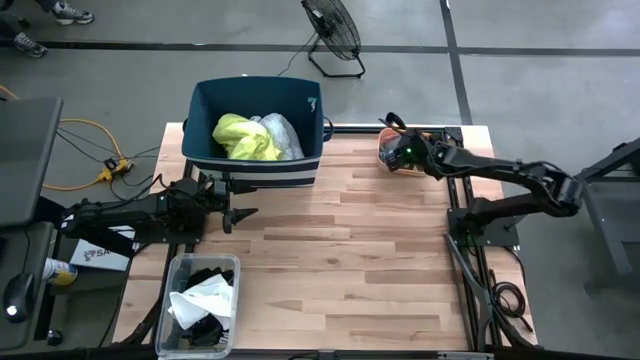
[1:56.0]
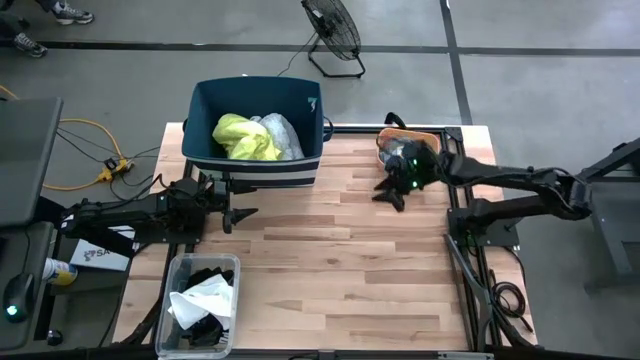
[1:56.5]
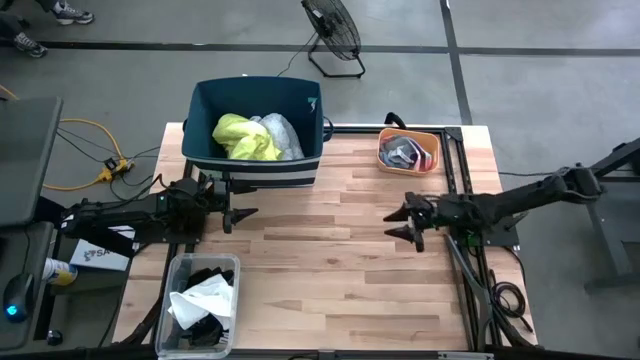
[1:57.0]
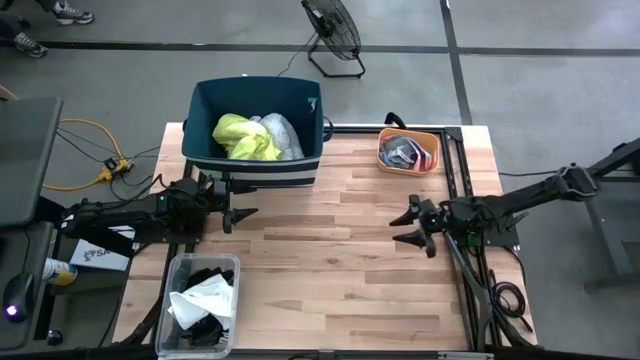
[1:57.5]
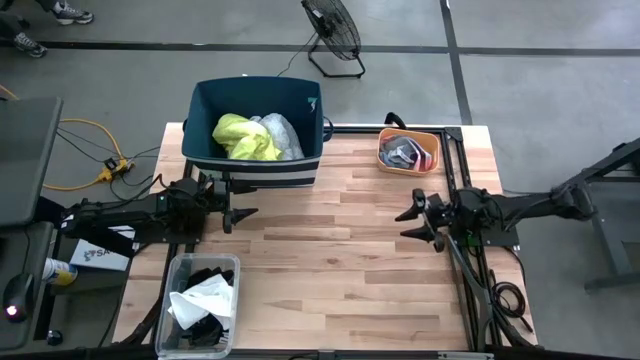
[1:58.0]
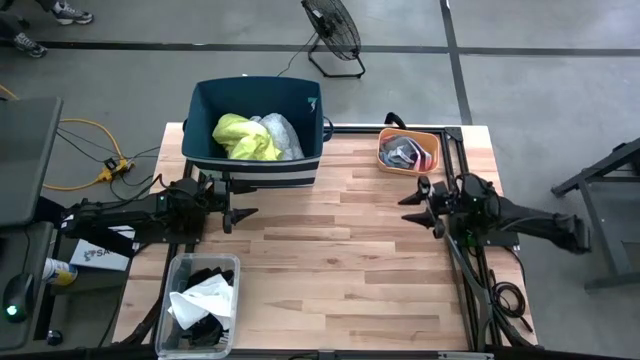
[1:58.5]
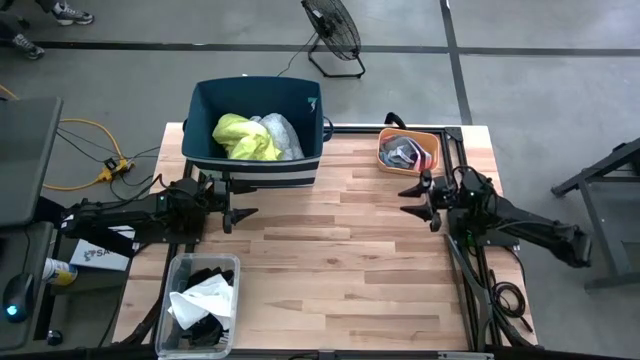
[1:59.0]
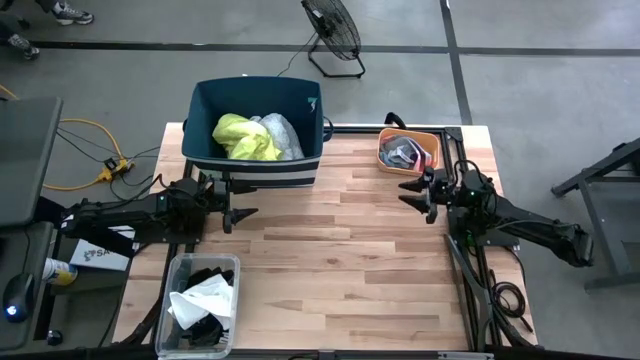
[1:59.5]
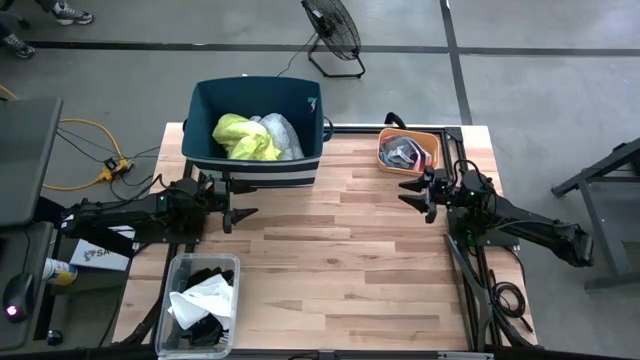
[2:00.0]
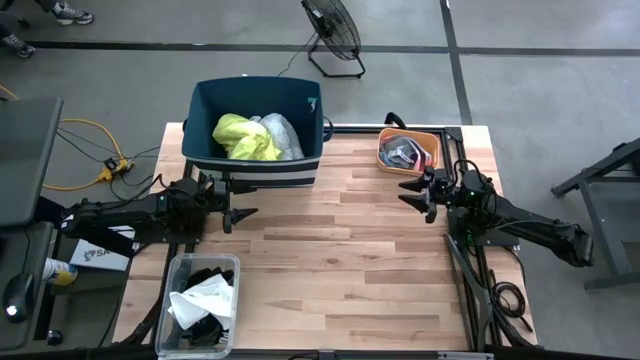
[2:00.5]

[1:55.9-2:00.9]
Task: Pick & Place Cloths
Return to Home Position

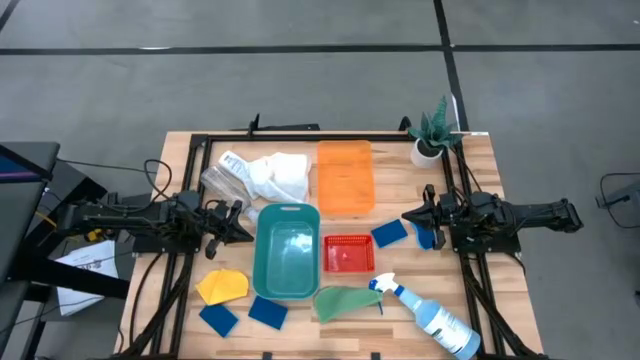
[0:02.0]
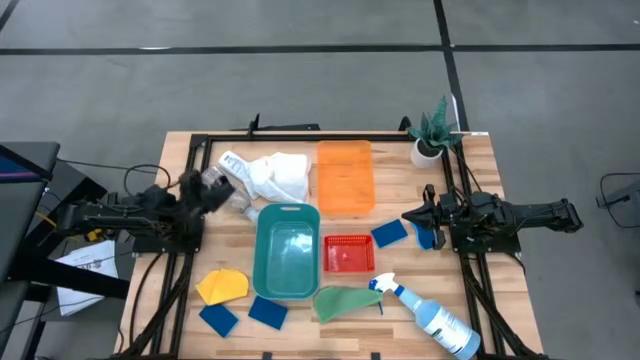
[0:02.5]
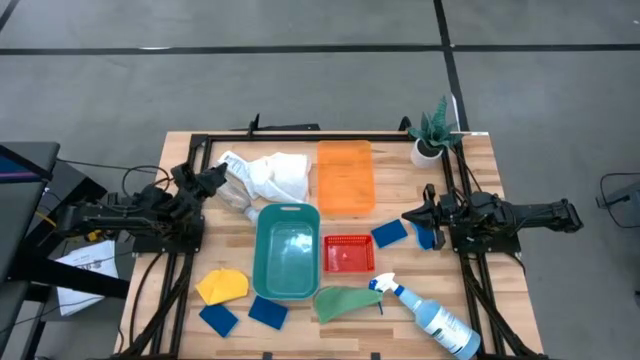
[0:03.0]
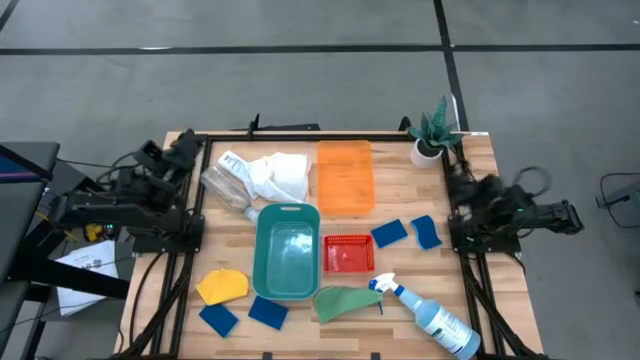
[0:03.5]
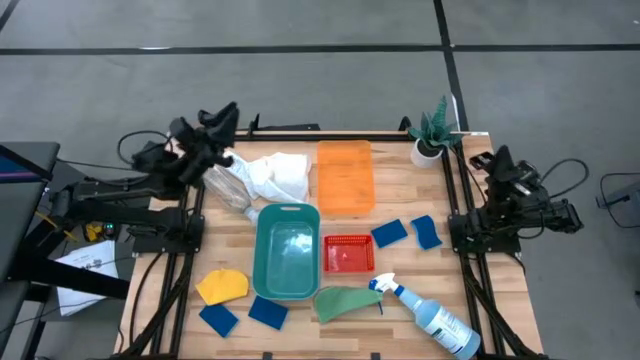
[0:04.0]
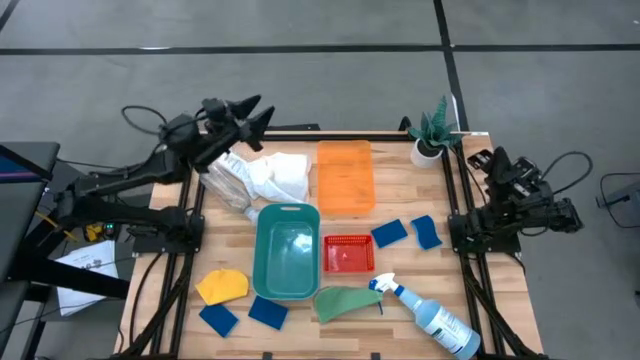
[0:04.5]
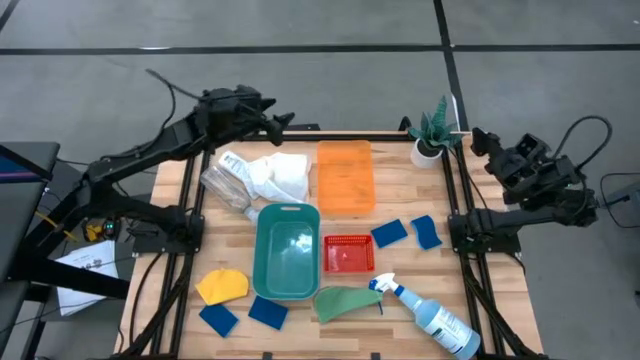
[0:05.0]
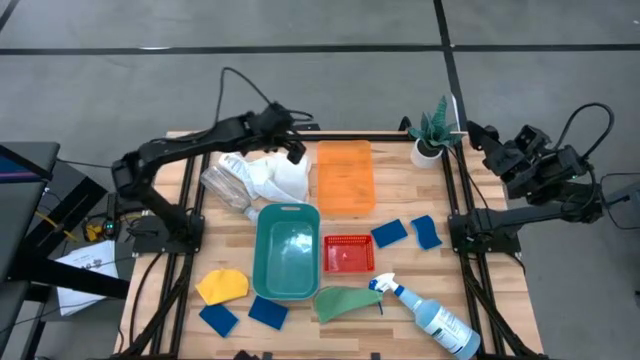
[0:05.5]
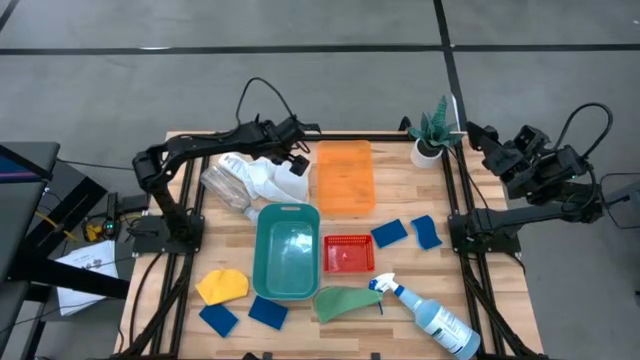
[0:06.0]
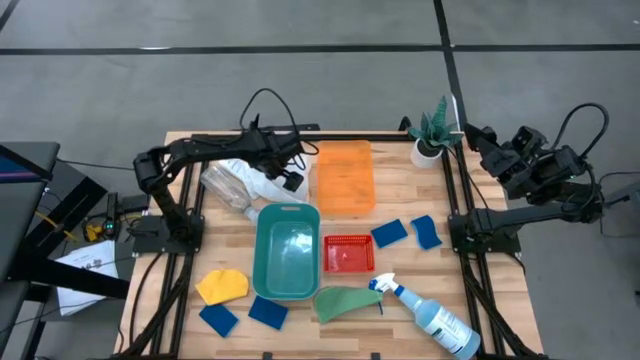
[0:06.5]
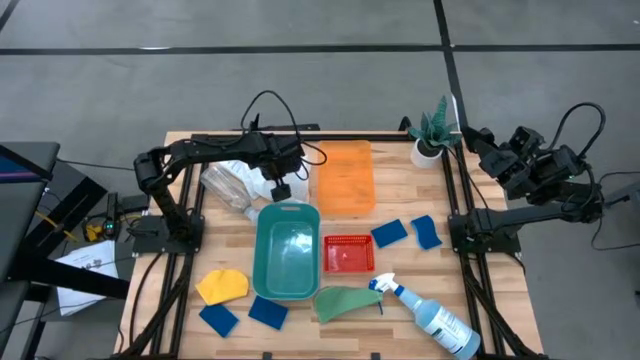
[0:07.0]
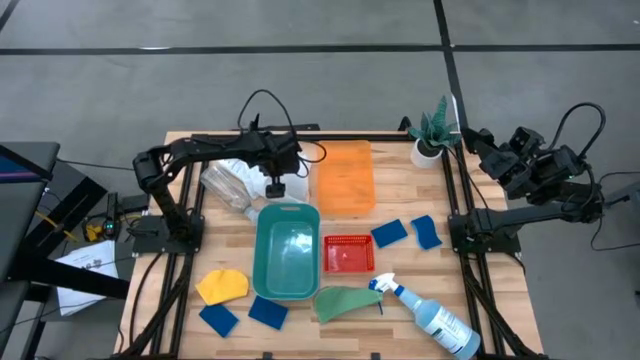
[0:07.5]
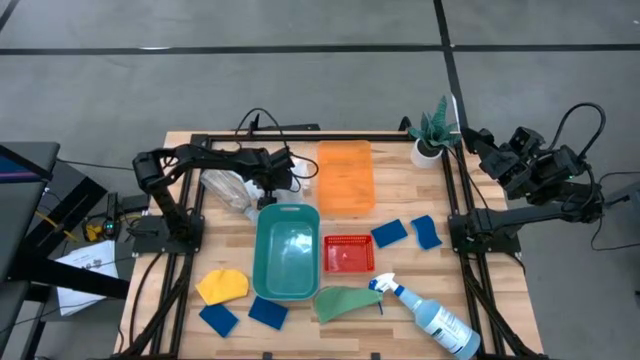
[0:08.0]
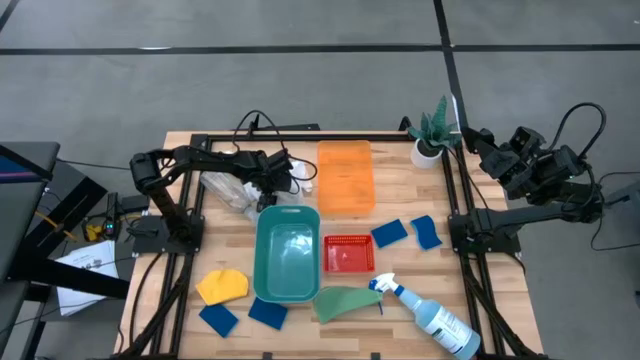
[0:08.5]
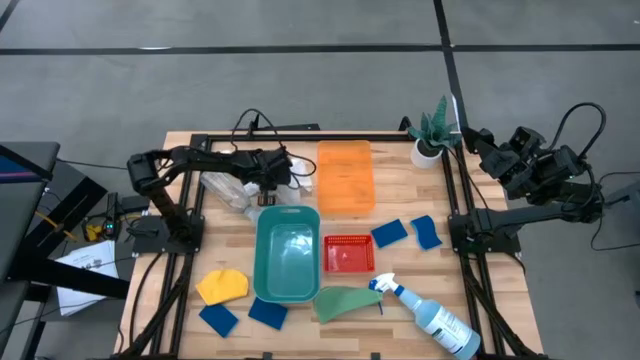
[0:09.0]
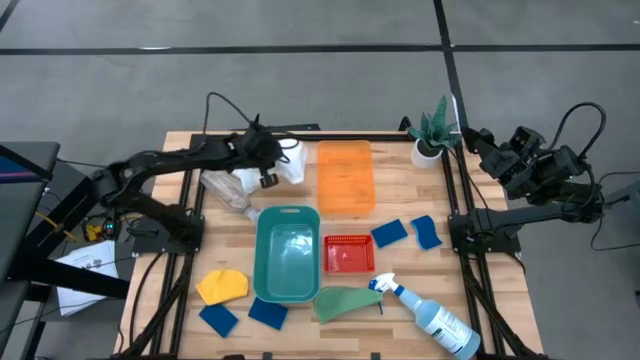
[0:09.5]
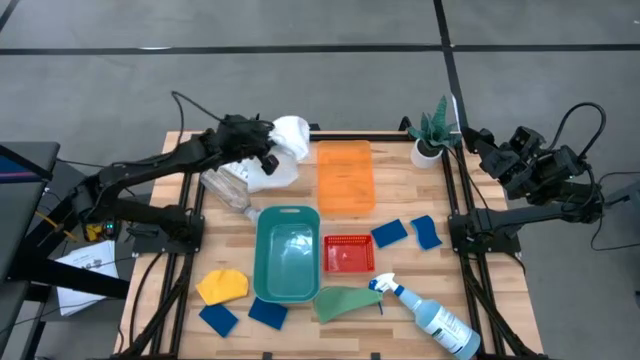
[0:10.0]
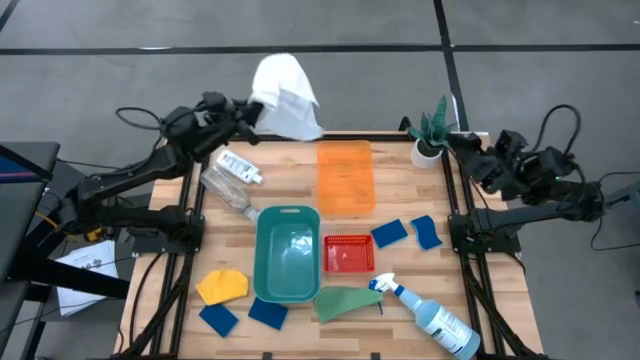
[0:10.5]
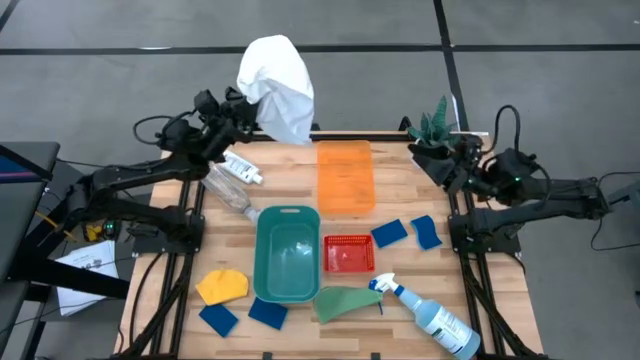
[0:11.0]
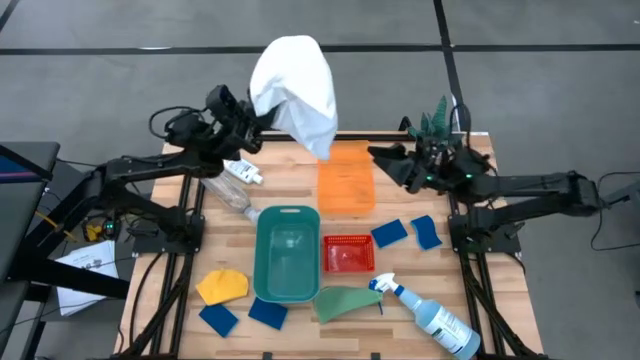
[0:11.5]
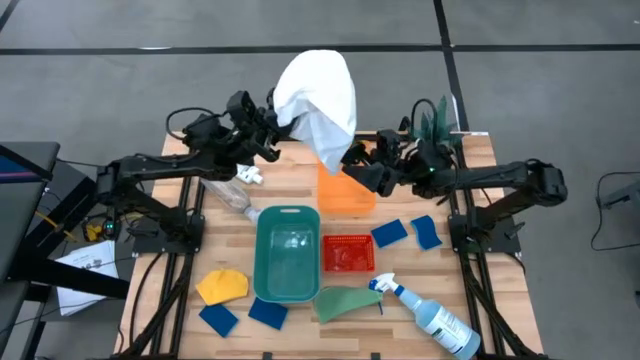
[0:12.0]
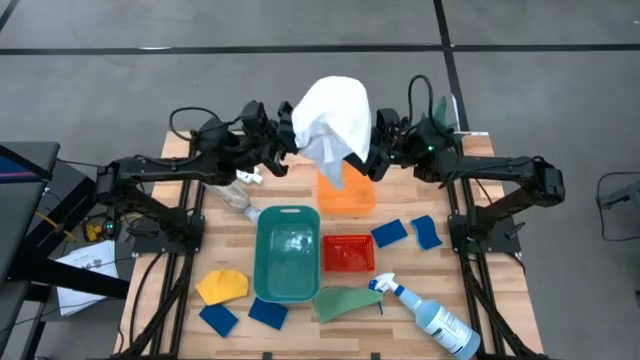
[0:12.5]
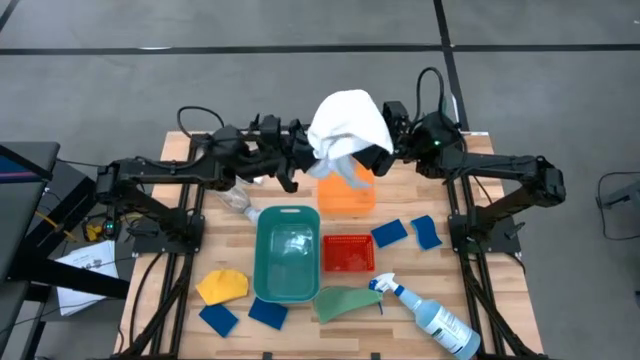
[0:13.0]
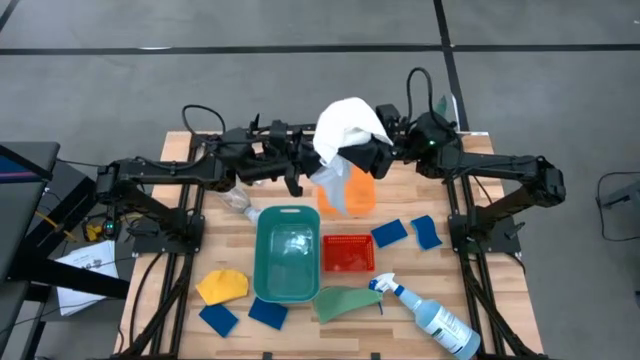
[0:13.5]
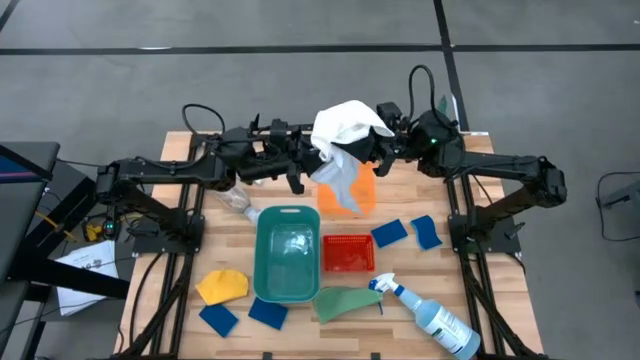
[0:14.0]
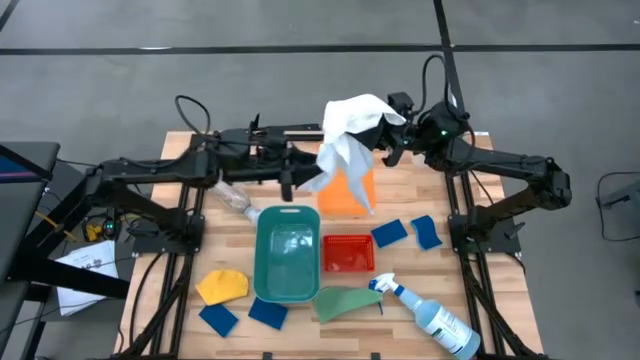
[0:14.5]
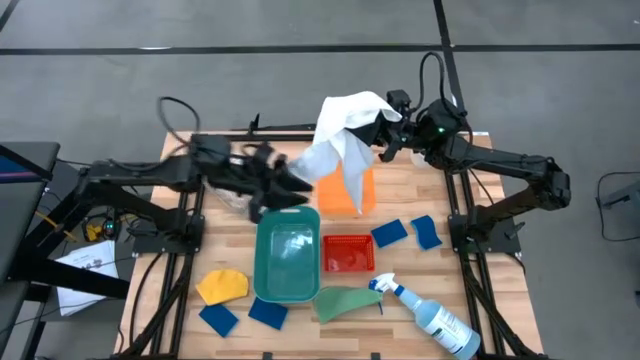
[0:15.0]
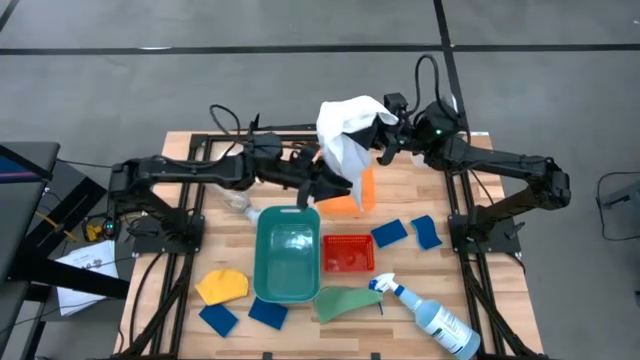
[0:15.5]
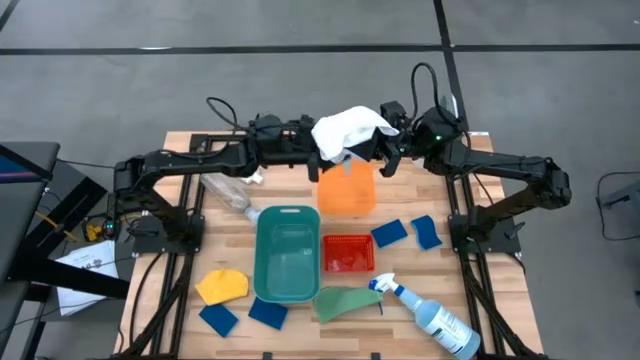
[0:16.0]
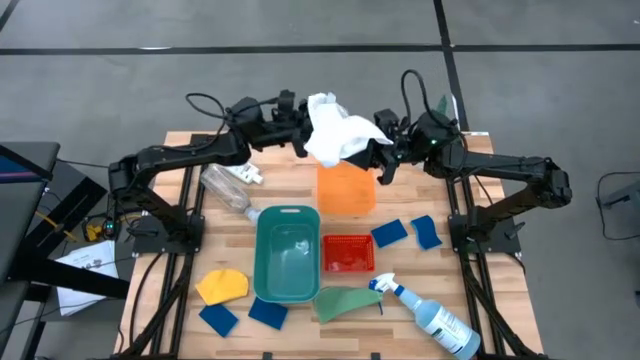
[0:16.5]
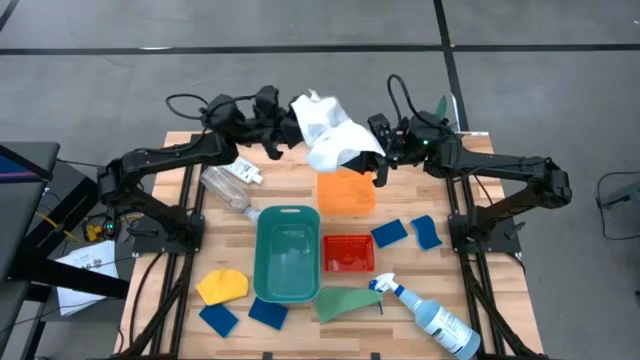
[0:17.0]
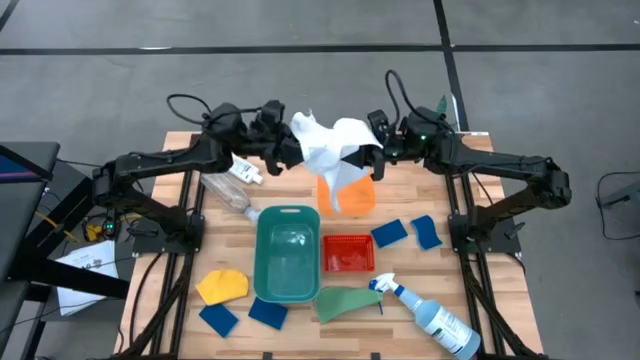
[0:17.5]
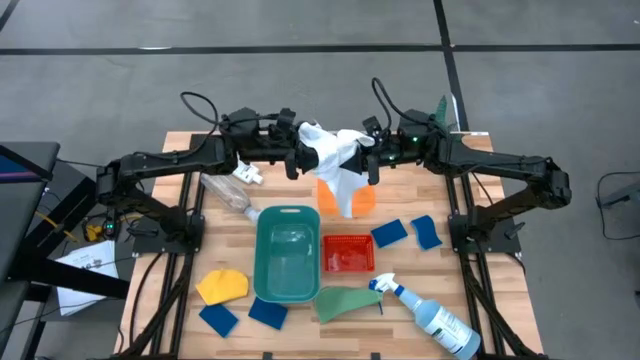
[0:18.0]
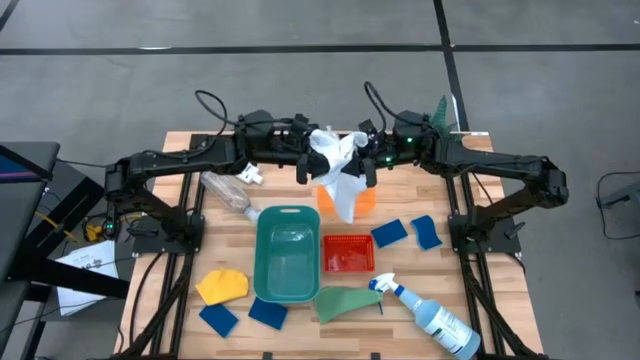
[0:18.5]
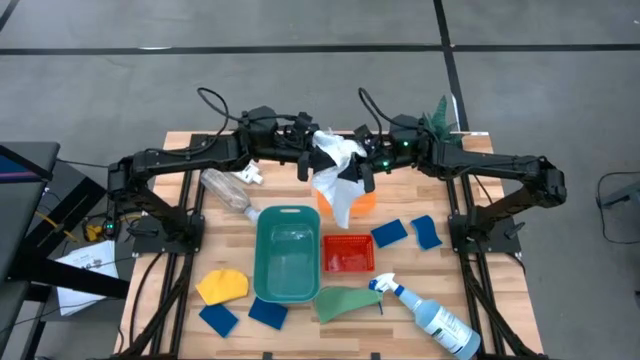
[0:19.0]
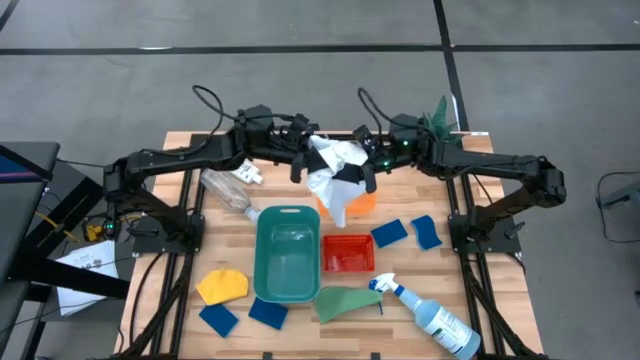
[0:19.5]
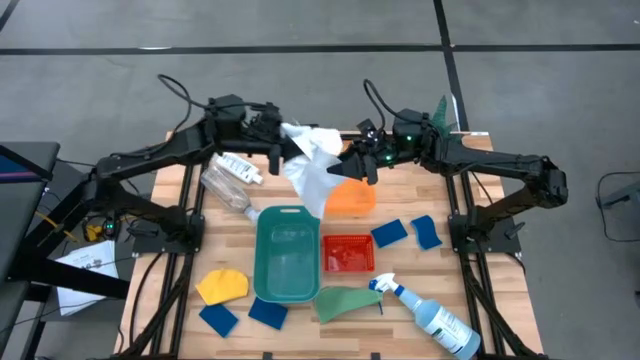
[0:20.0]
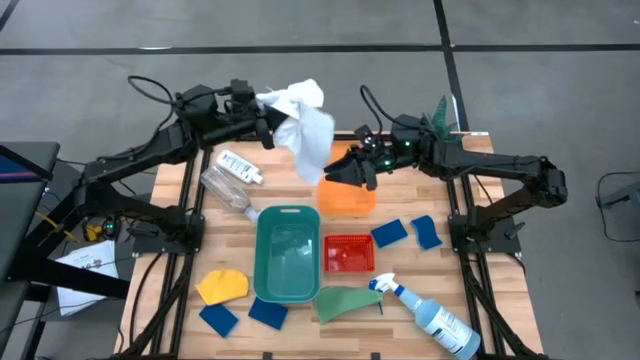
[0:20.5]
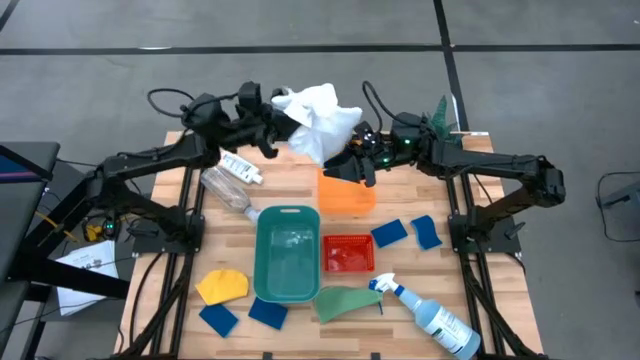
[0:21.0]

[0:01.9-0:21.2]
Task: Pick & Place Kitchen Items
Put the white towel into the green bin
